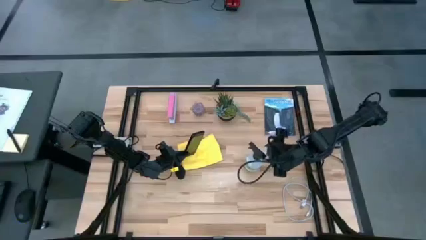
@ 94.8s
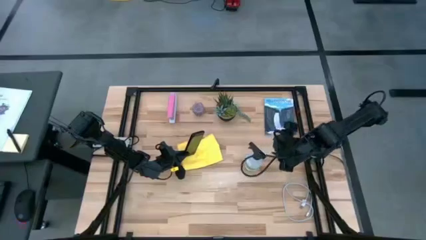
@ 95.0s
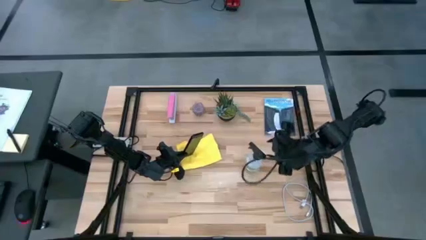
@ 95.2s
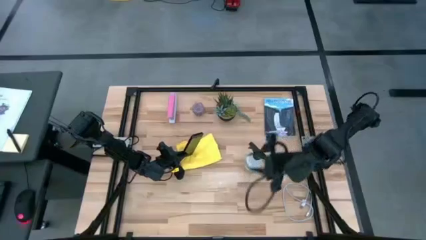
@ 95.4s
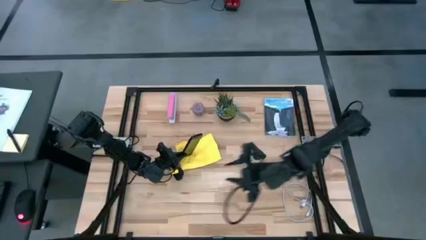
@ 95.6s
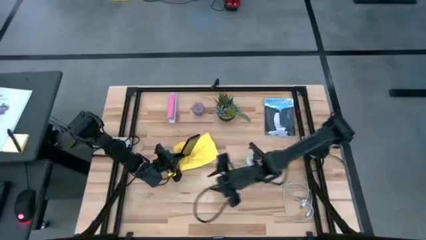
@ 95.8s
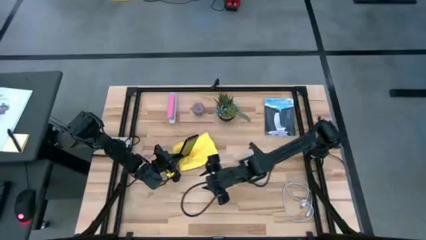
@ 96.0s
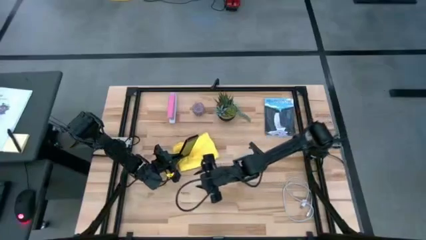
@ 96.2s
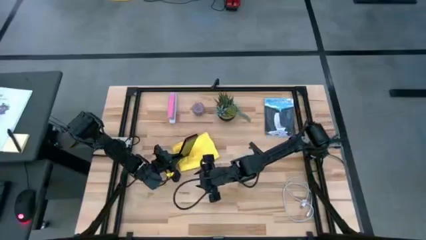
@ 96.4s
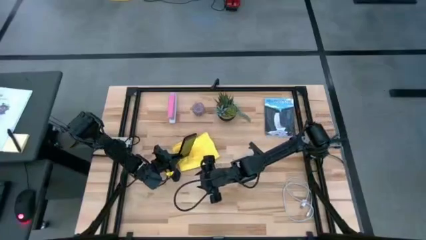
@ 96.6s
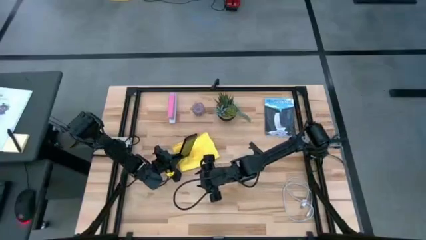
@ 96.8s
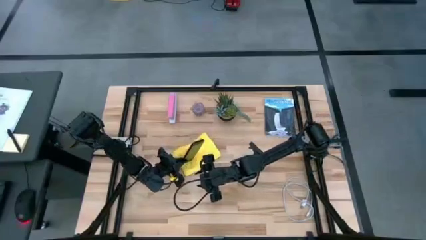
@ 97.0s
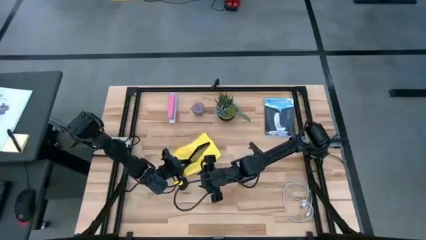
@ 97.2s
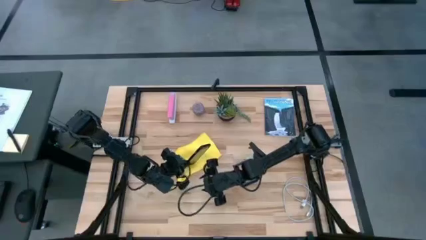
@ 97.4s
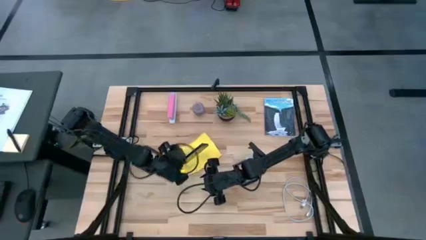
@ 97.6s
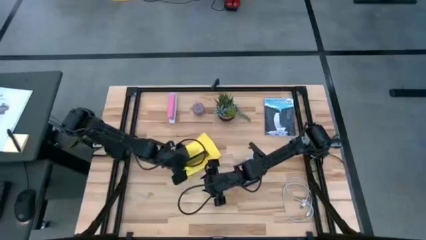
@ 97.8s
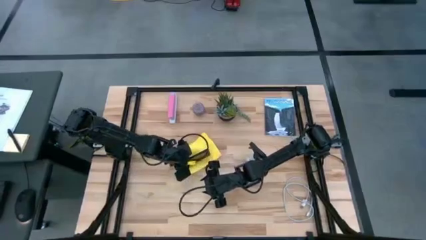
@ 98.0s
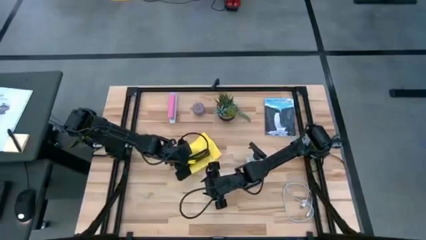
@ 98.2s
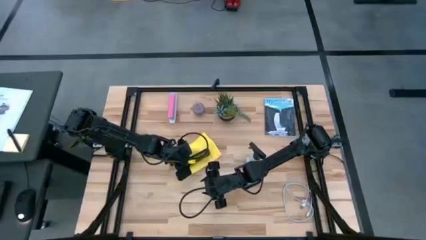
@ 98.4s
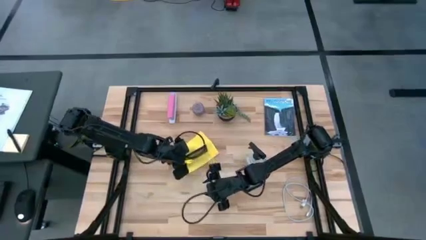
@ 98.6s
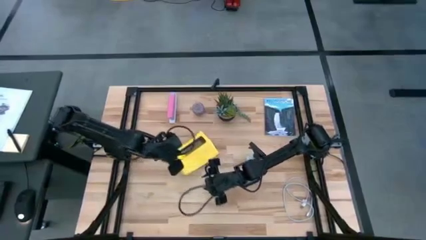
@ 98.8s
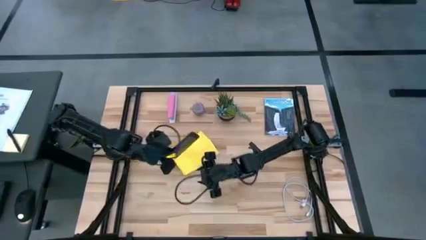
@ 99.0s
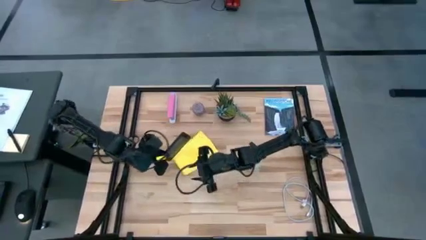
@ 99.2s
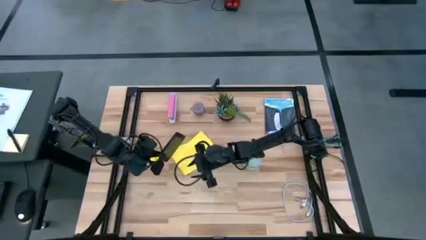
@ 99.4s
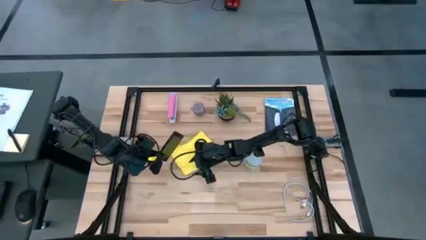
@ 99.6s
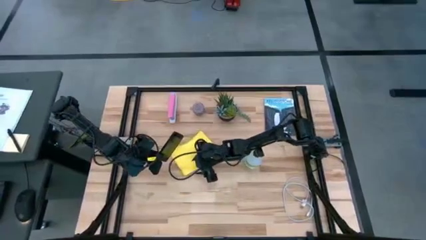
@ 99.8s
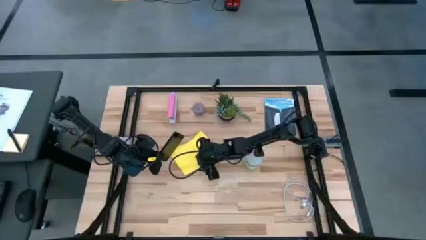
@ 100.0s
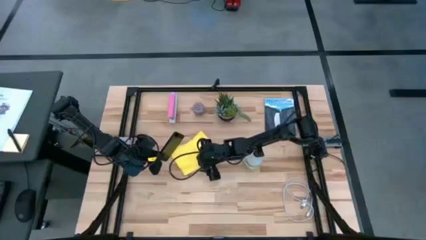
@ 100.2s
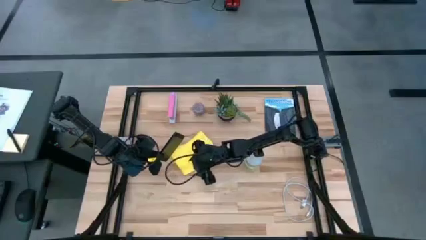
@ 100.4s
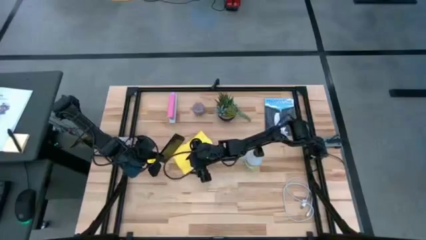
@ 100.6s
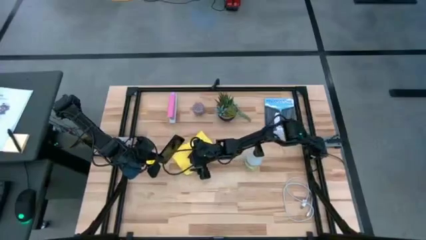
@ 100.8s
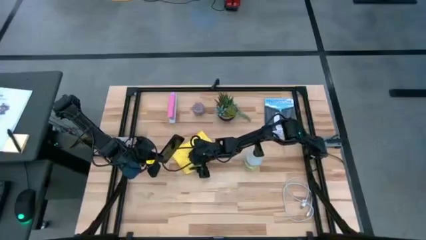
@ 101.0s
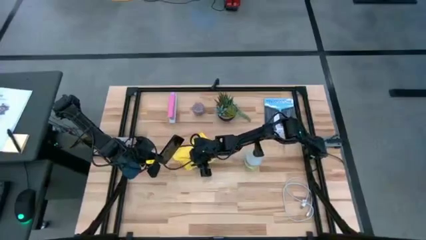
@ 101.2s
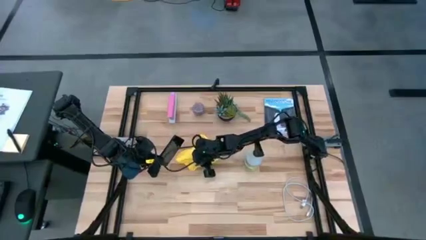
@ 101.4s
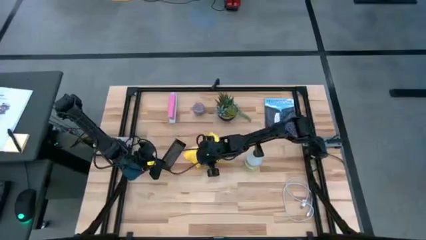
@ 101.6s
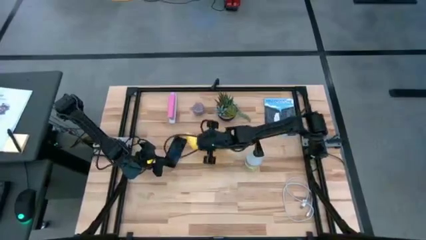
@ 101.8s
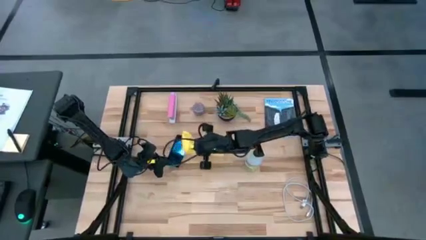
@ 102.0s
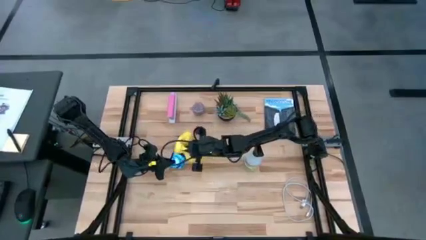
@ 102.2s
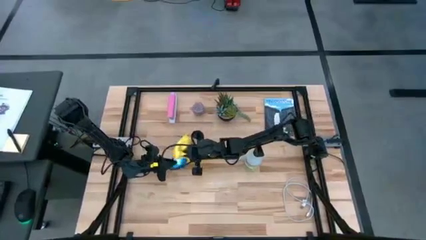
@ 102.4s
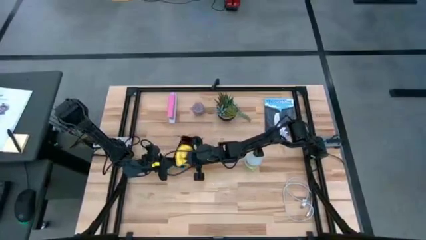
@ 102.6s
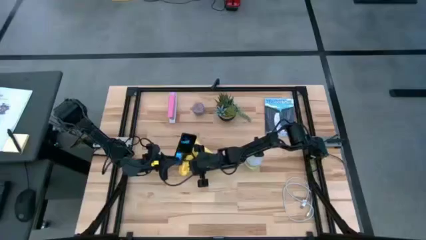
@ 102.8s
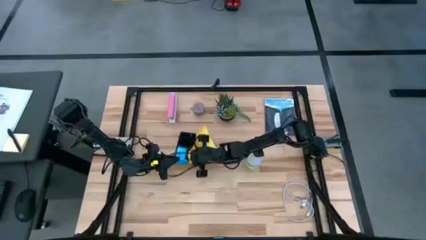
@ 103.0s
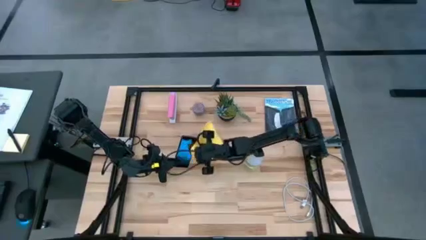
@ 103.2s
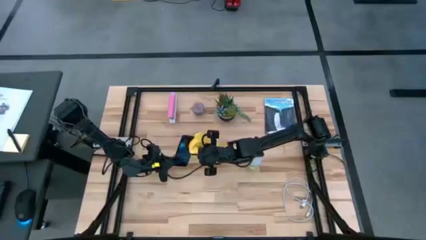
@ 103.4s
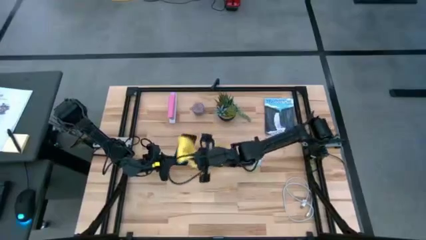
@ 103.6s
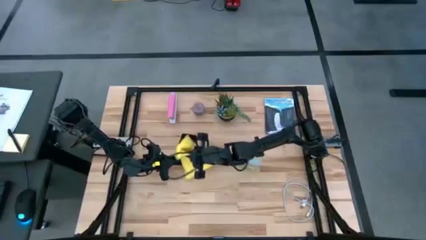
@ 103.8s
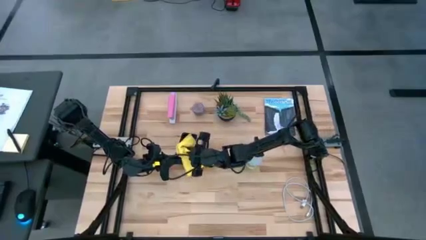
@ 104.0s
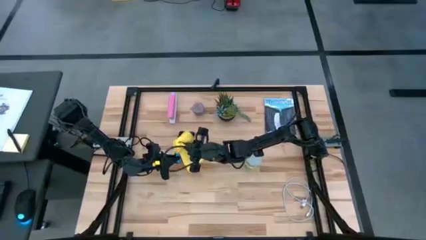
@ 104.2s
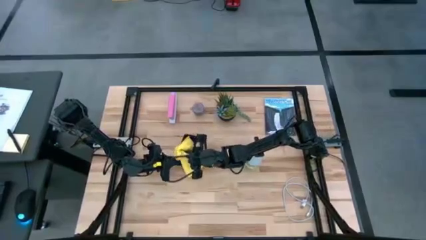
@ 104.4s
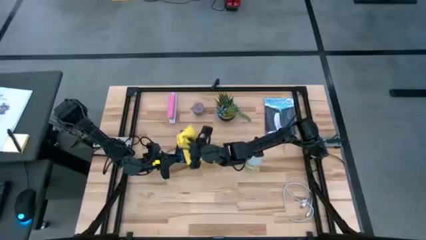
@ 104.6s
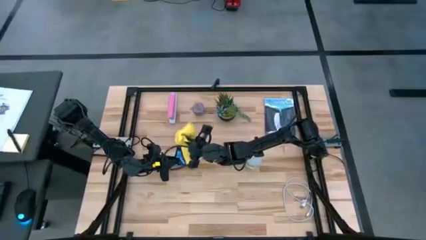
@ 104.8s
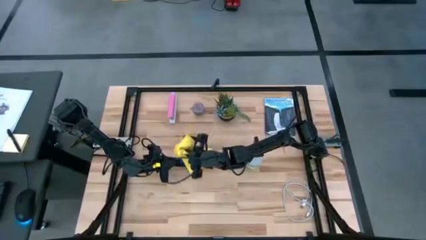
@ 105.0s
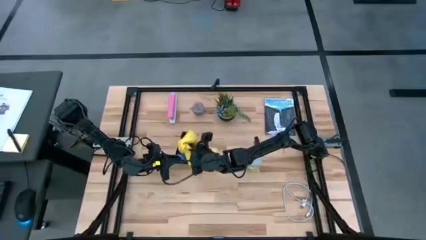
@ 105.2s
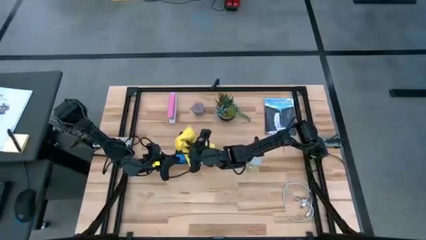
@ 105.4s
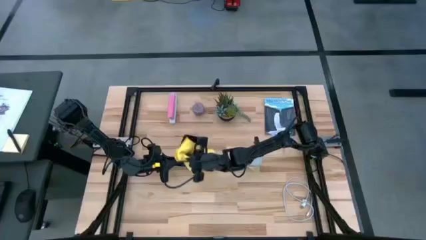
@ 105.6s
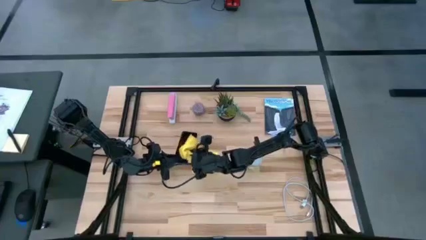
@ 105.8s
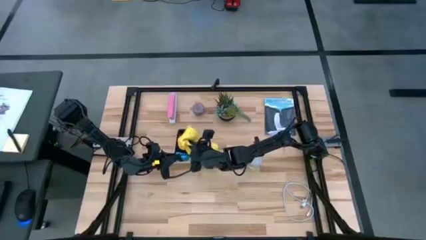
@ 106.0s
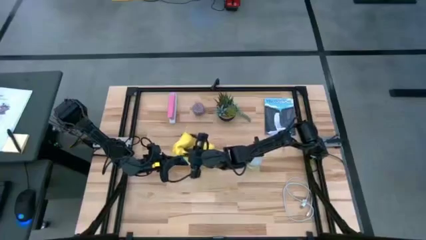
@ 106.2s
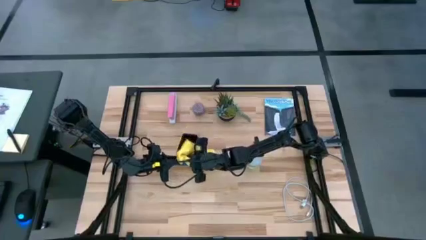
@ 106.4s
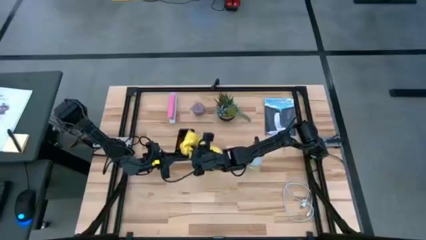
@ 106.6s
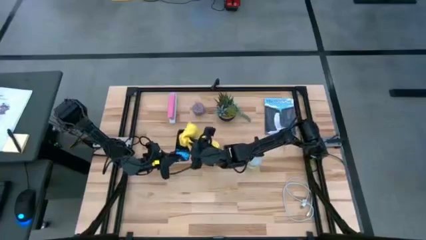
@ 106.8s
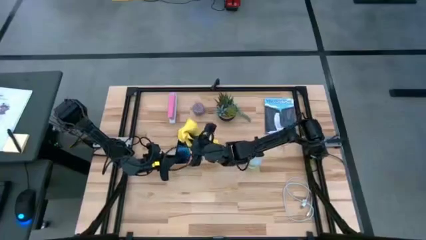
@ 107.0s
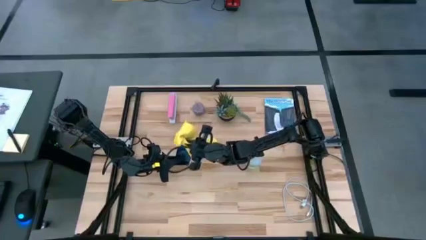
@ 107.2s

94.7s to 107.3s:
Task: Apply microfiber cloth
Wipe the front of the cellphone with the yellow microfiber cloth

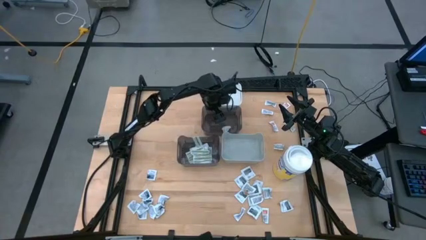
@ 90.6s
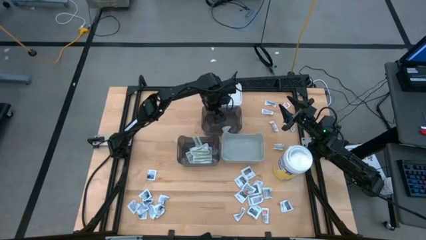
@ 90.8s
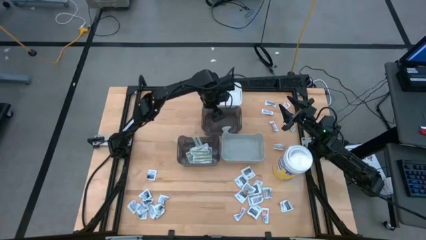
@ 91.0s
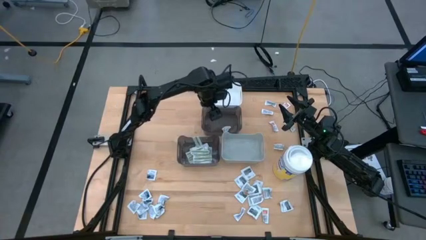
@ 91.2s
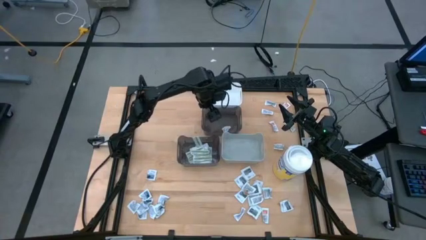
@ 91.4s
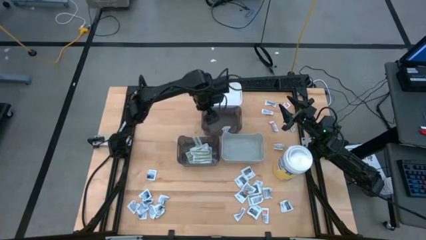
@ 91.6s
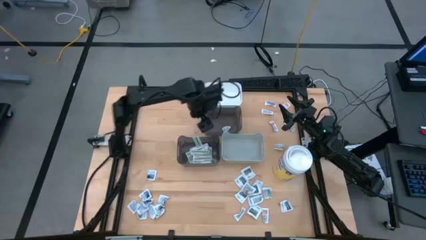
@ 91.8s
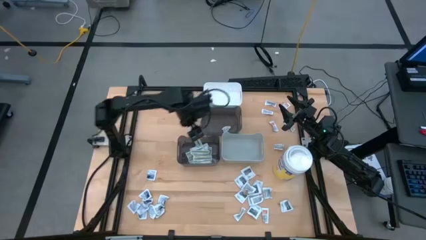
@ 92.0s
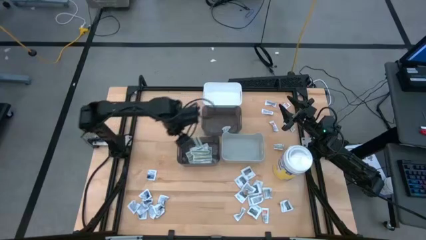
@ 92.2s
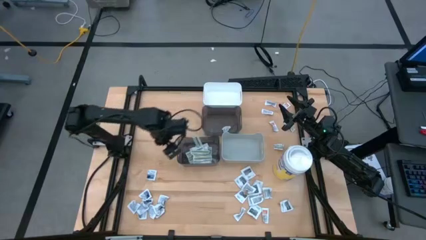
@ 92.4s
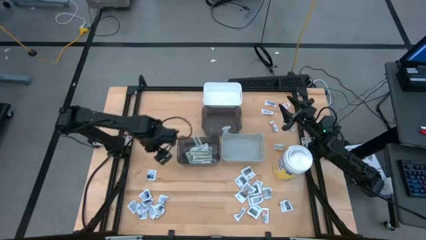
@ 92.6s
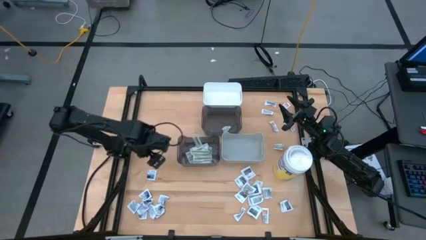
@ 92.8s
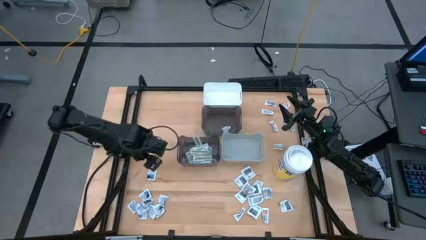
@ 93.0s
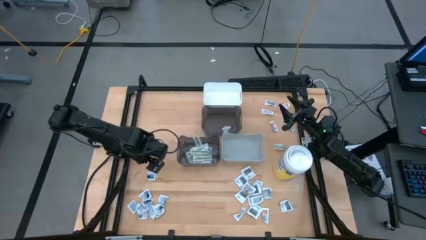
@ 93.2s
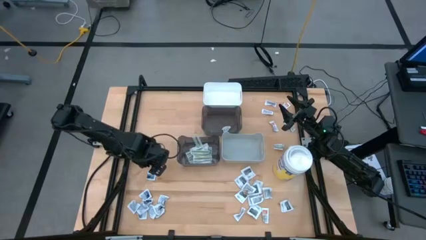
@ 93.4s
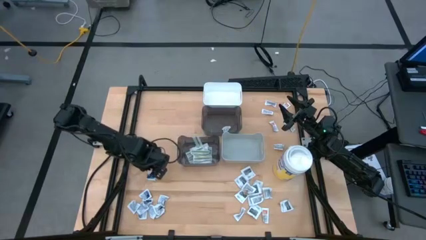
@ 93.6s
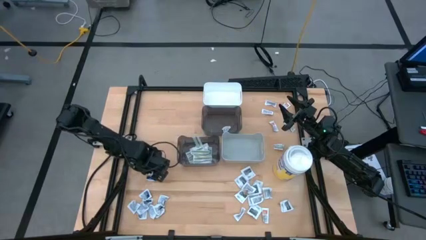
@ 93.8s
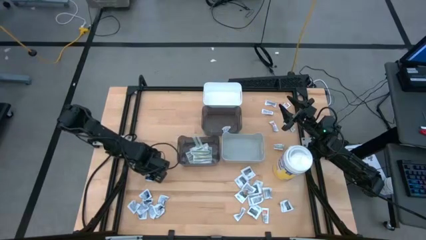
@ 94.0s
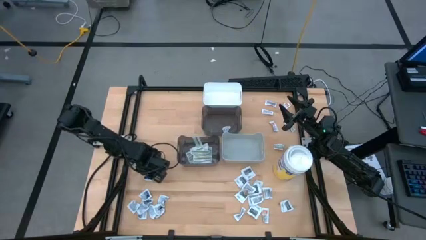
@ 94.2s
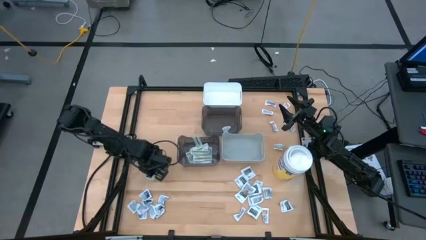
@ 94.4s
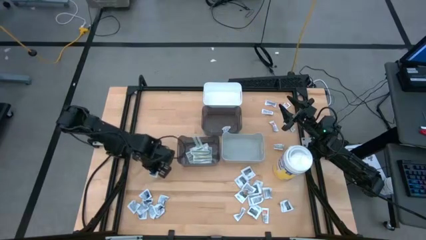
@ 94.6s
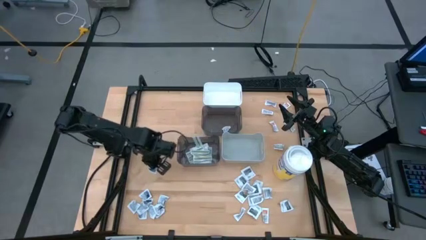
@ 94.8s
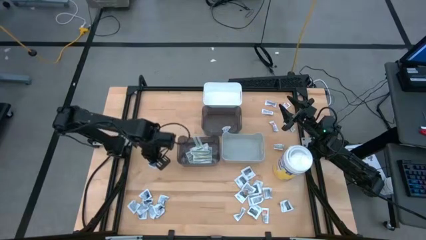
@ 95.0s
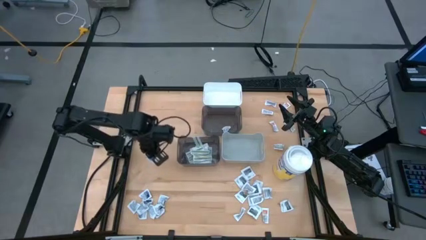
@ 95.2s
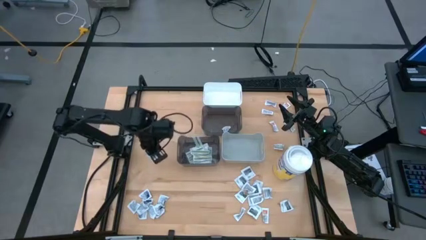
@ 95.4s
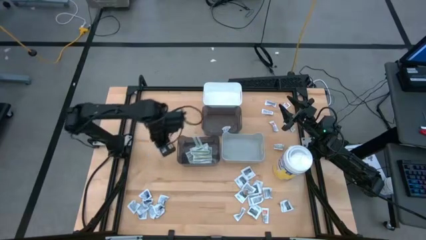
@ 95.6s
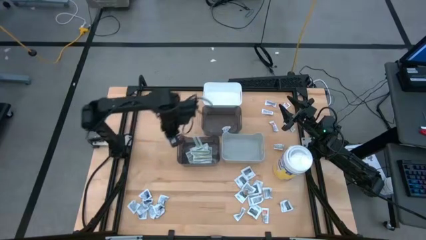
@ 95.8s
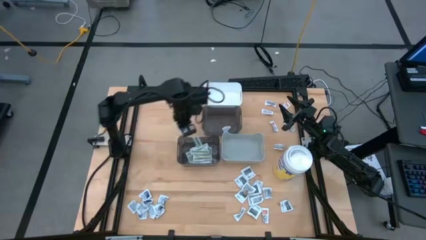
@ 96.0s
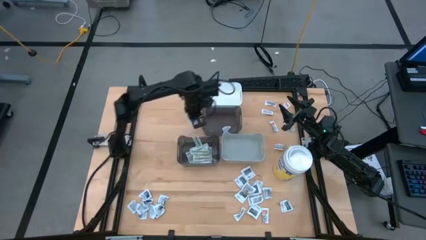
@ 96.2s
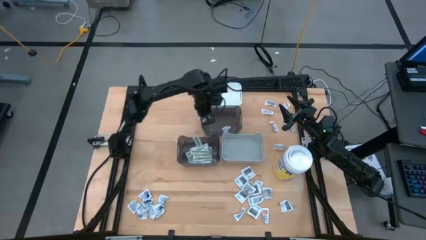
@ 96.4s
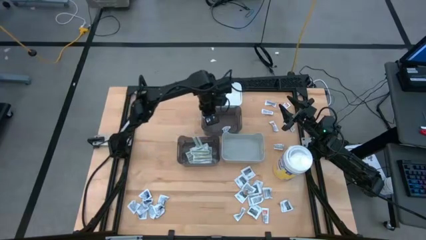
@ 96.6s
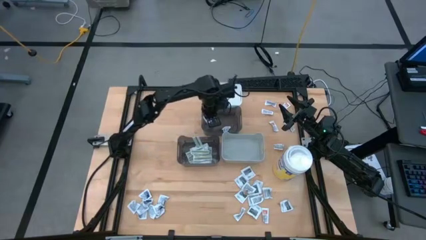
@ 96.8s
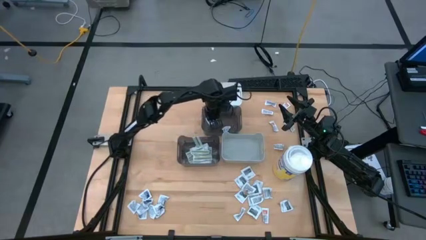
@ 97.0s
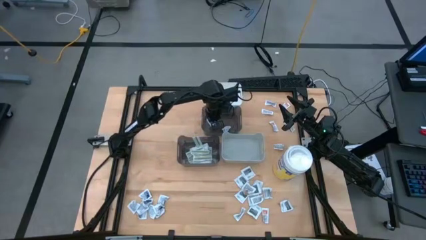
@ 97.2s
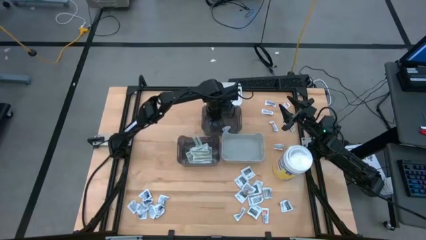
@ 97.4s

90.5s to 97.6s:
Task: Pick & Place First Aid Supplies
Put the white alcohol pad into the top black bin
